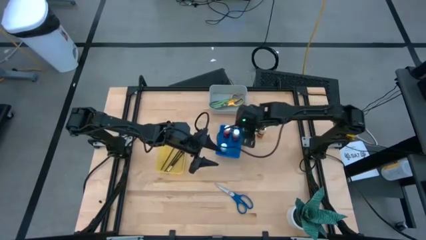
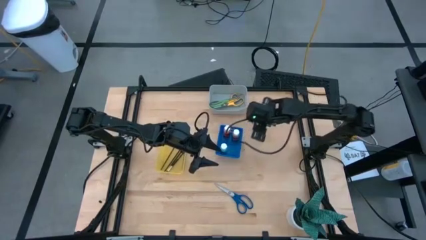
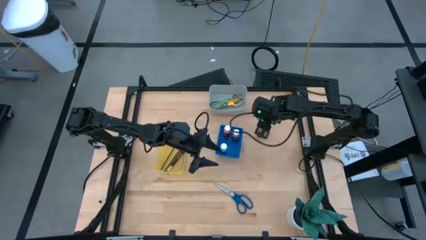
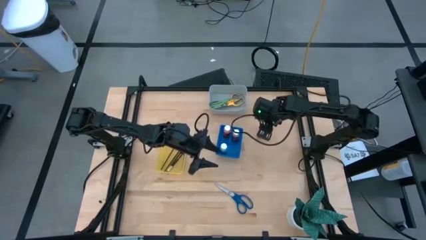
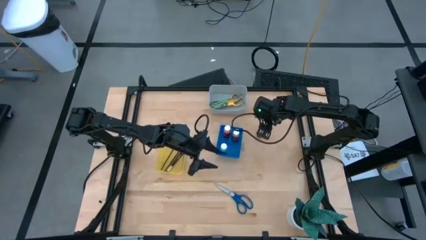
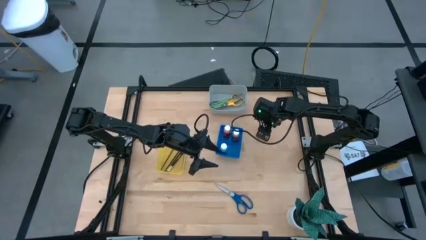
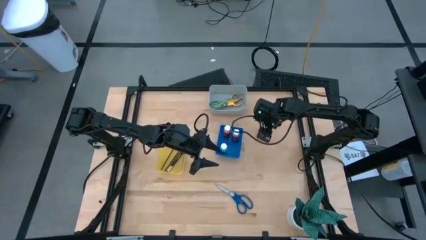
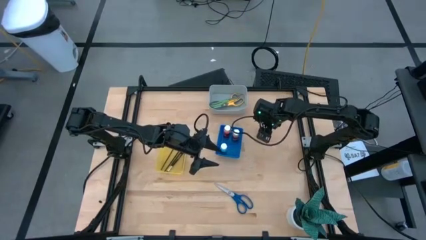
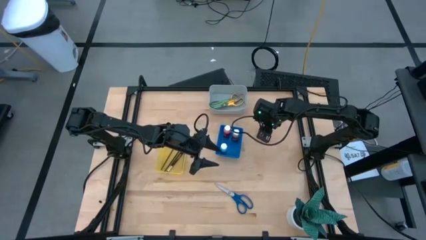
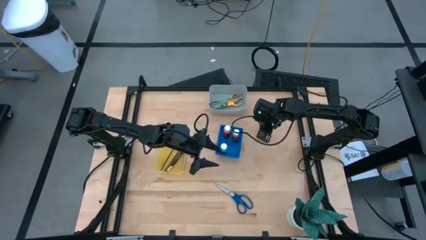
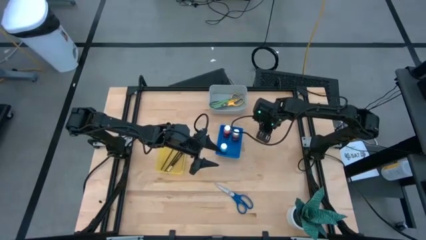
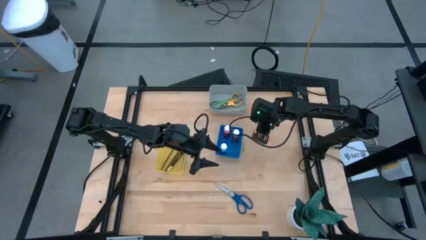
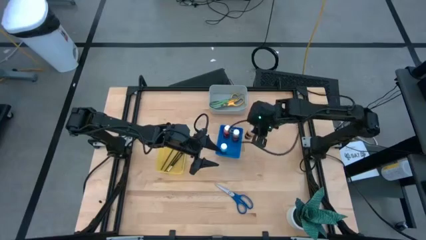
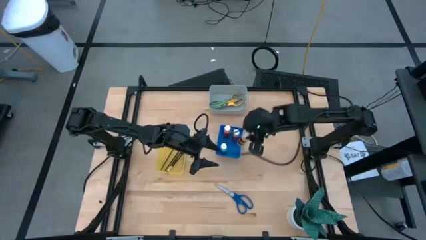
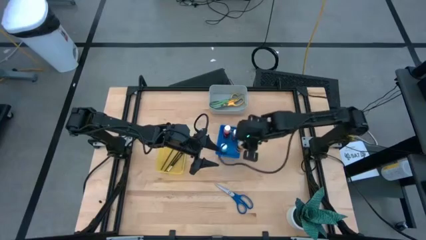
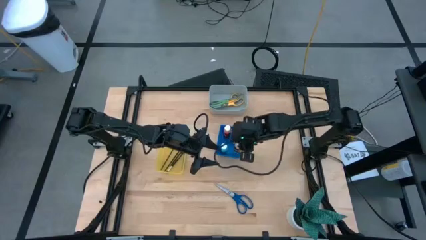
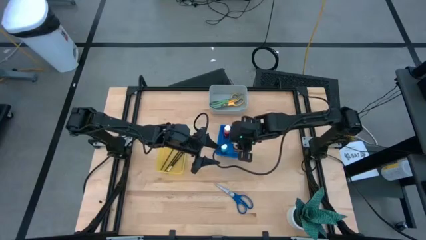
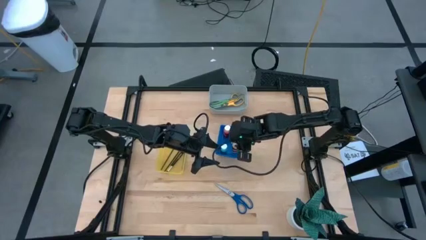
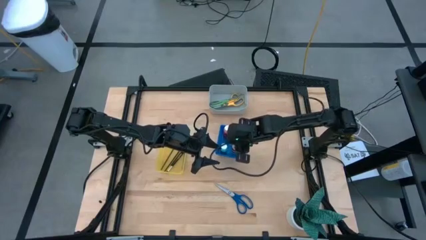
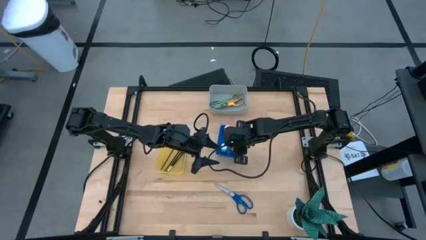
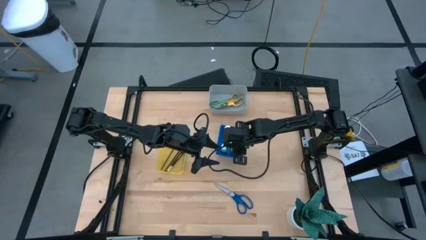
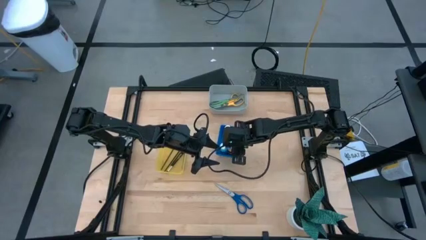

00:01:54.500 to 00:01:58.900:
Task: Pick & Place Paint Supplies
Put the yellow paint bottle into the blue bin

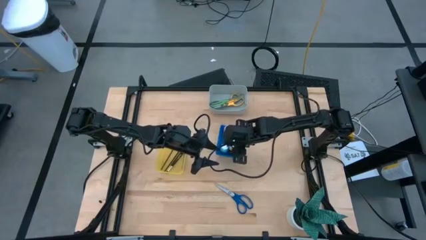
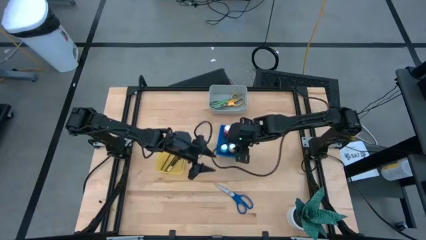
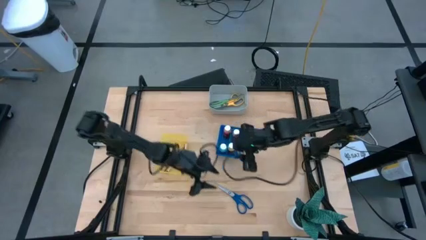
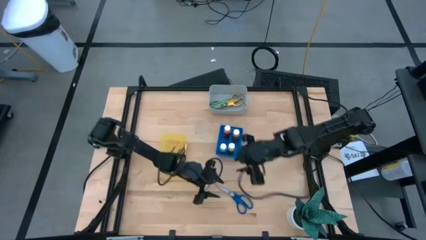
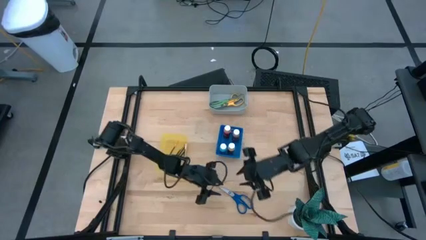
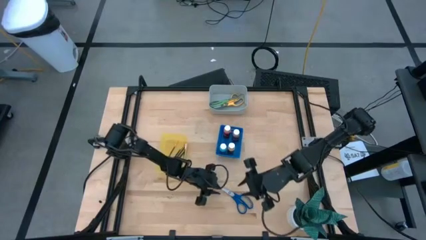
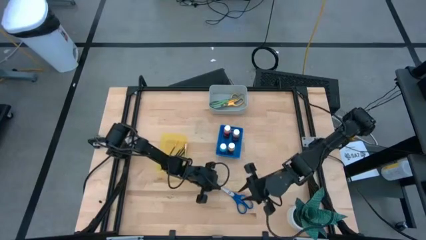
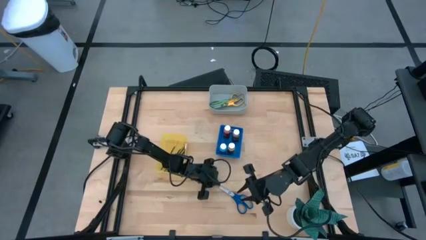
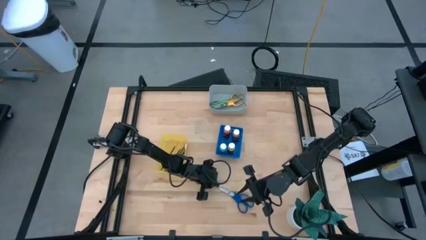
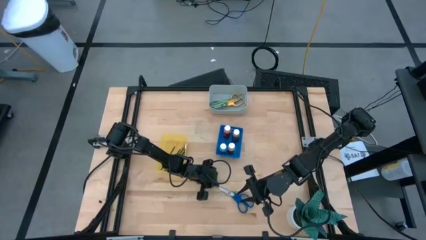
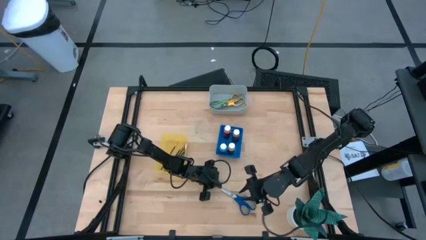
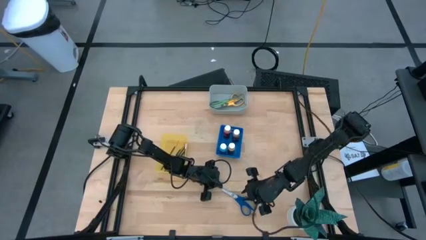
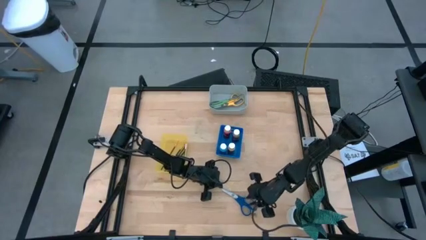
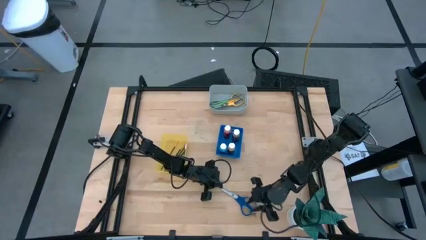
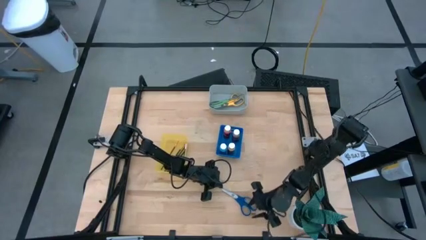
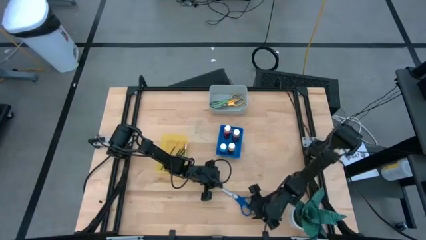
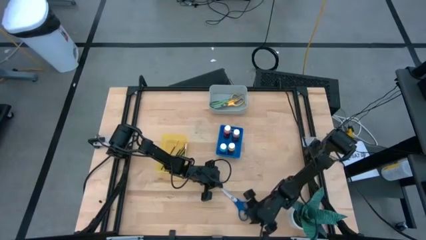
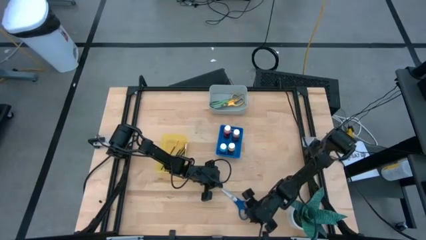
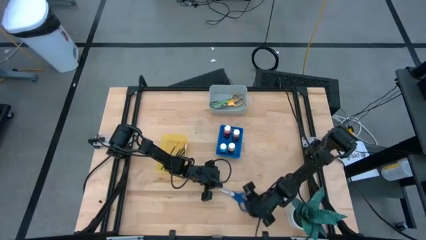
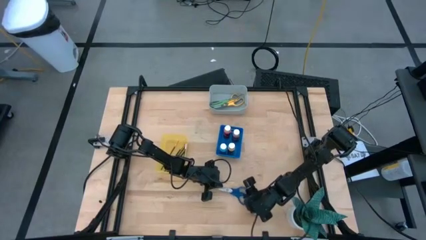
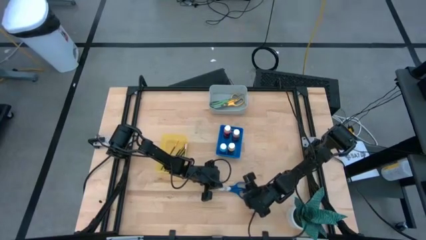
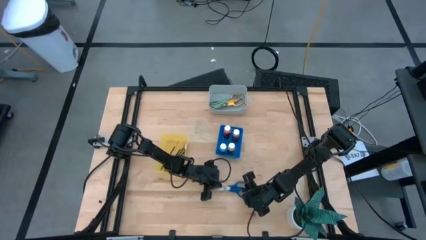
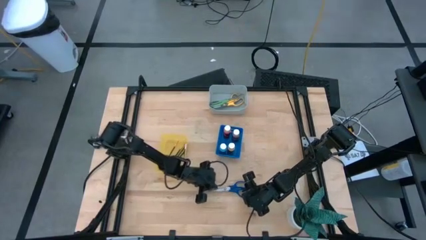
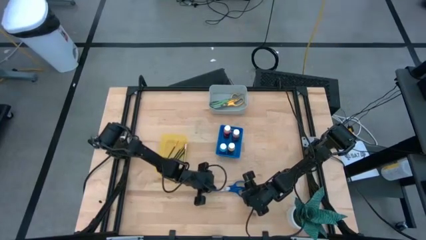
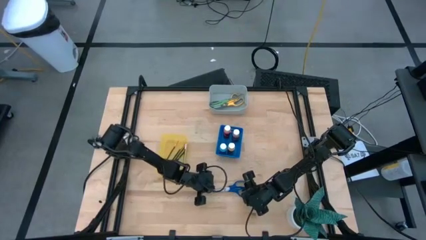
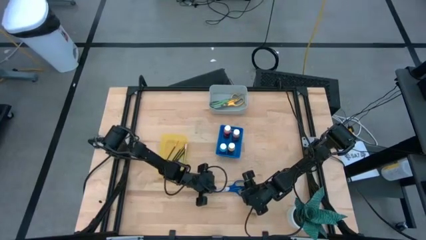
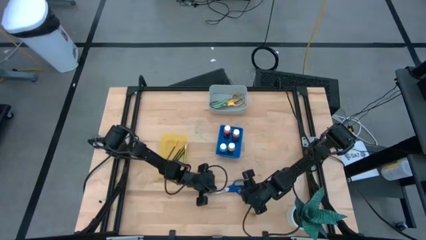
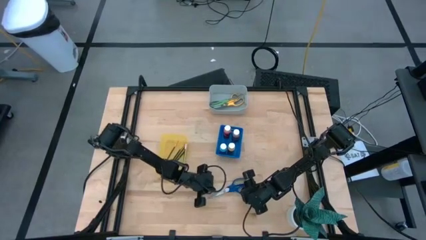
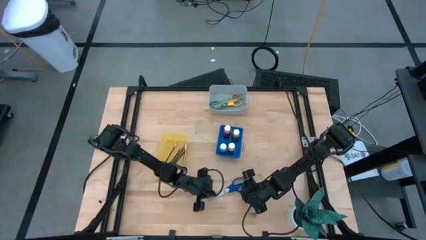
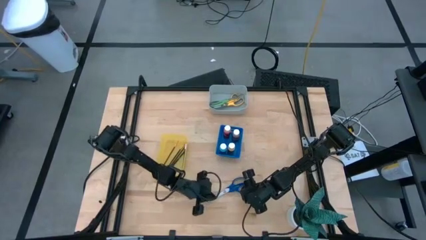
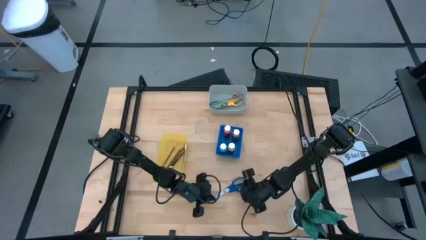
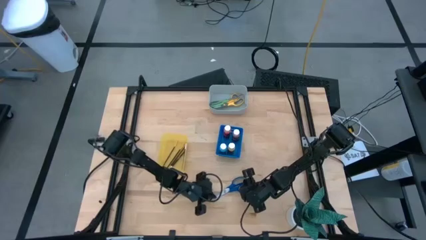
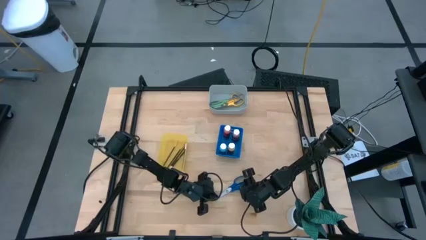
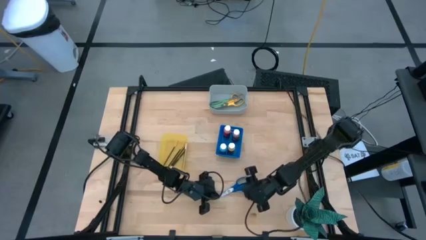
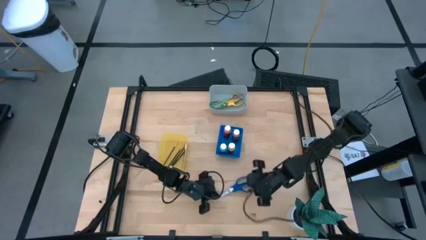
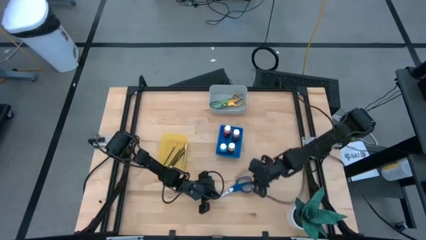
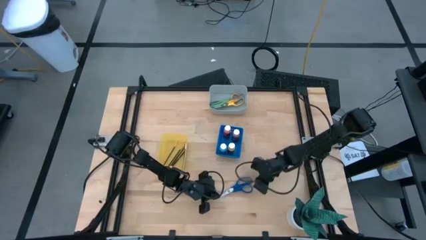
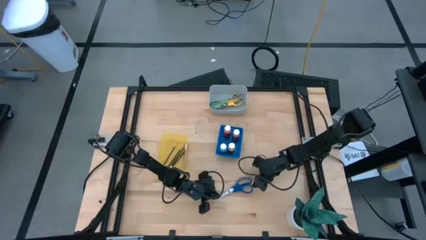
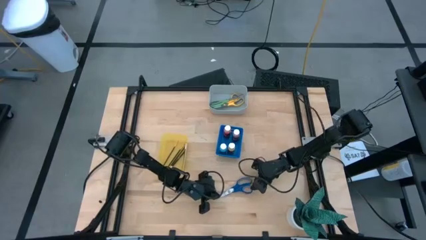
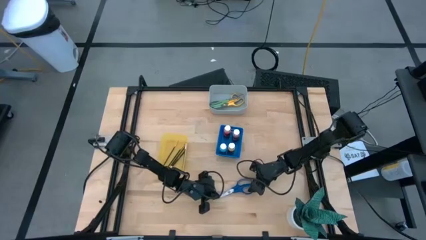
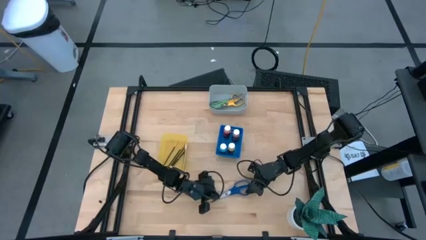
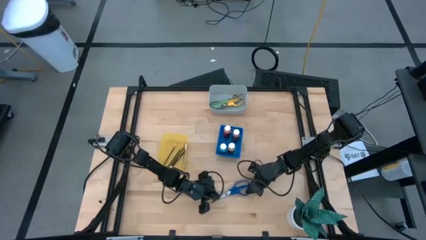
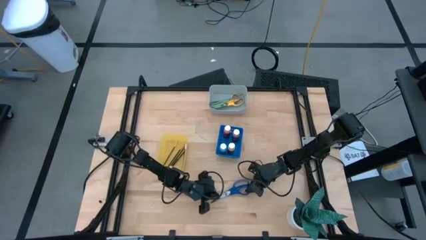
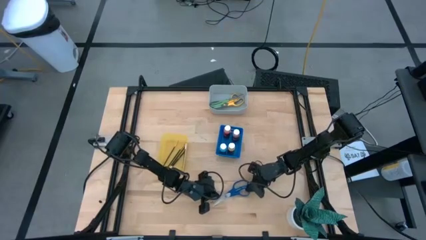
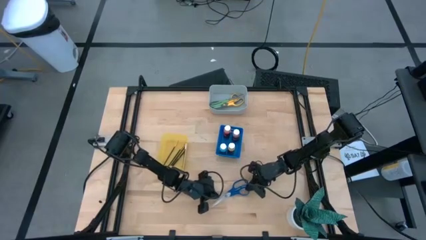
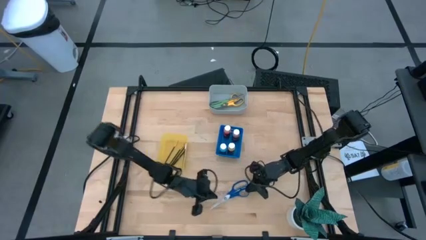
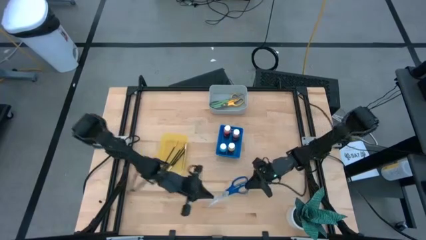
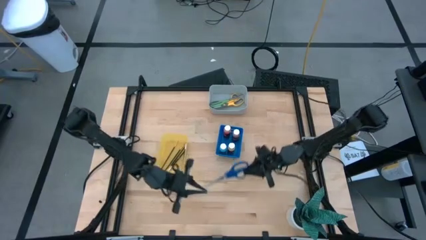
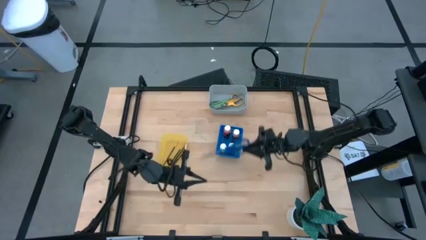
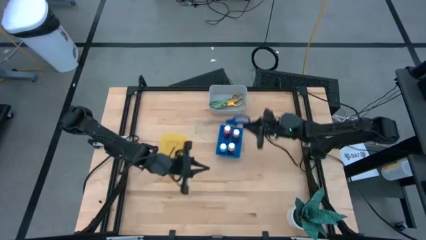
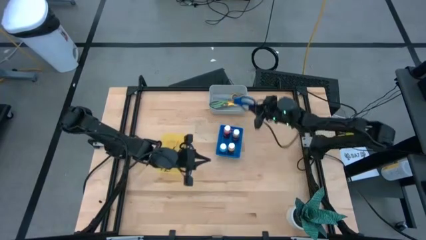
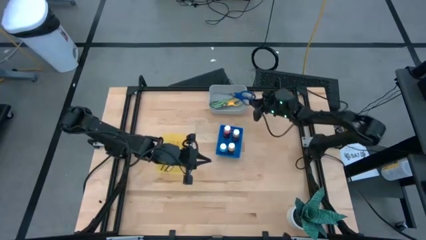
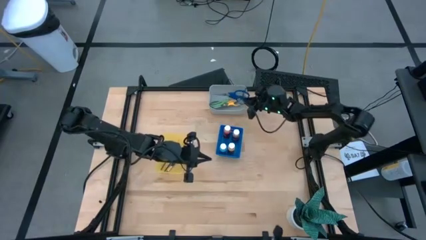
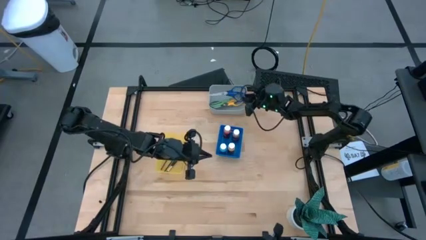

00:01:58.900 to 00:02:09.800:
Put the blue scissors into the gray bin
